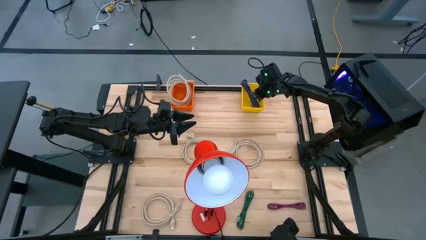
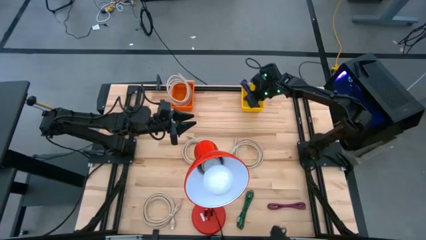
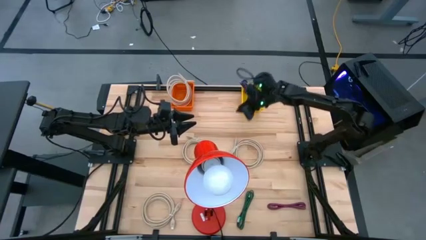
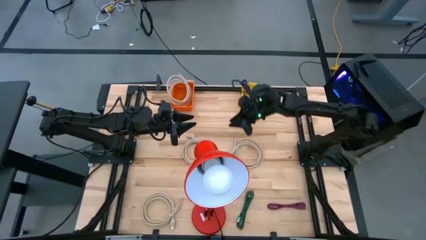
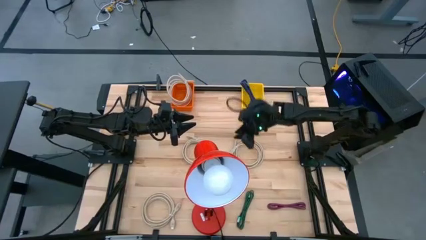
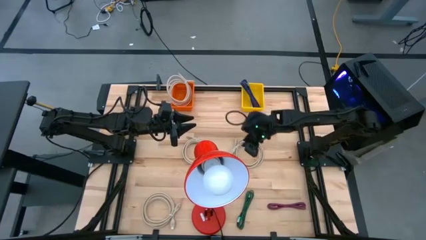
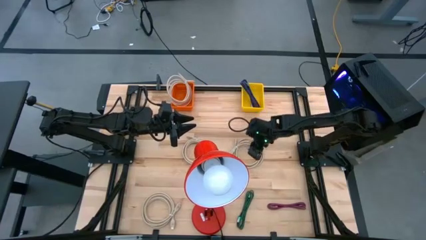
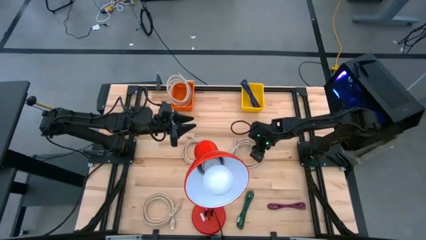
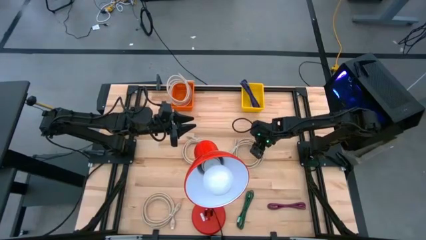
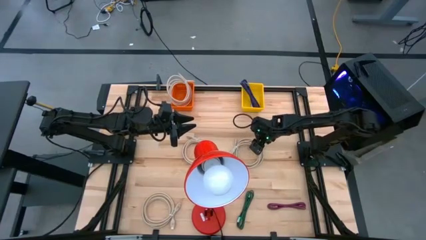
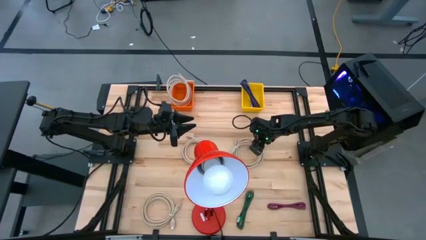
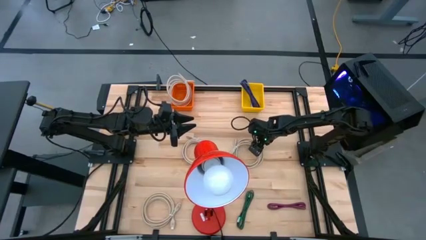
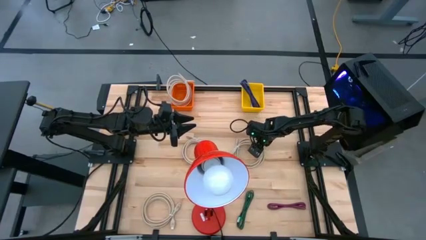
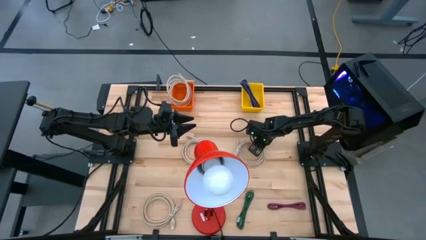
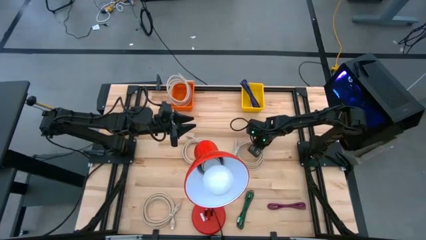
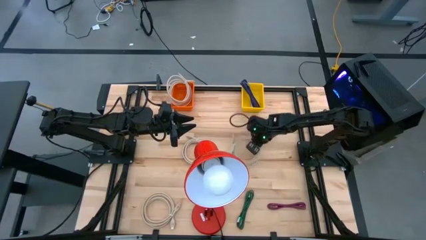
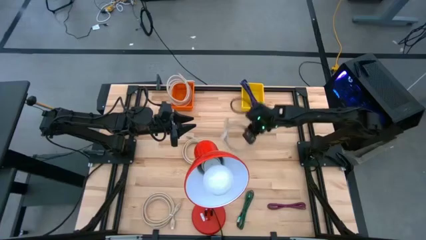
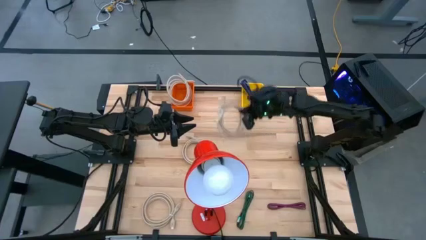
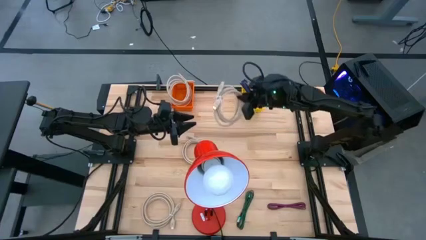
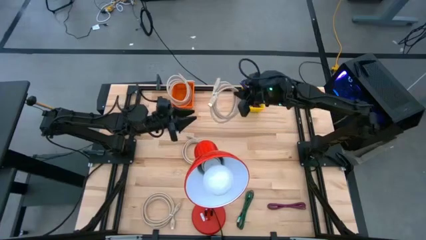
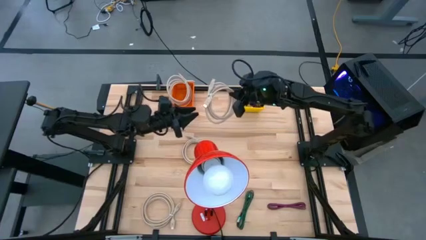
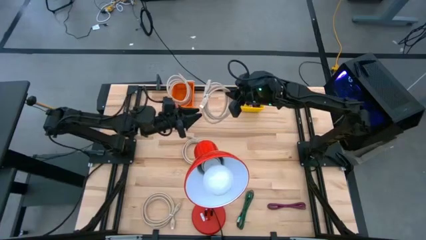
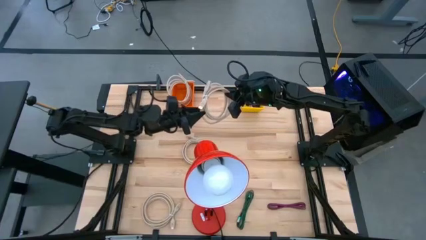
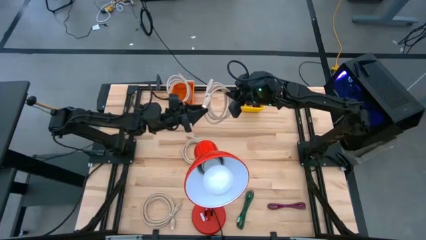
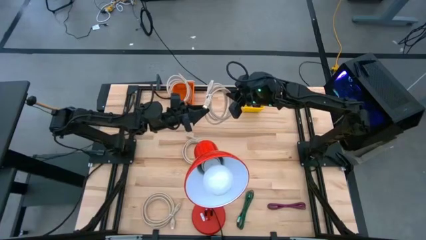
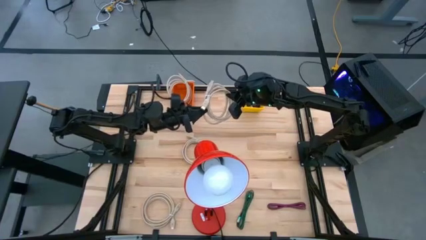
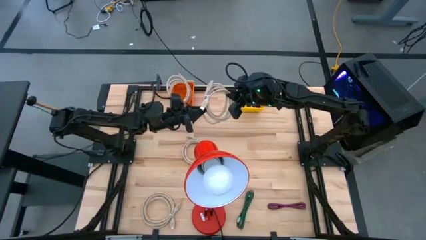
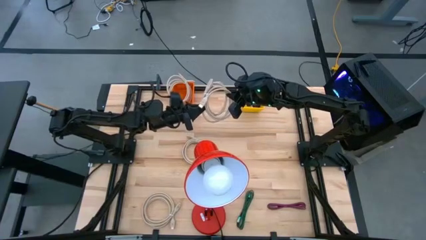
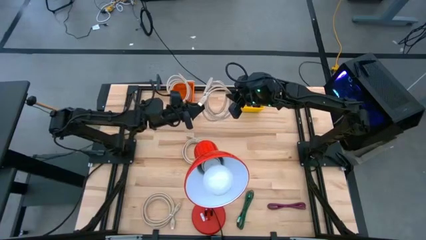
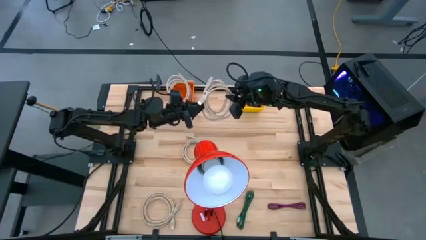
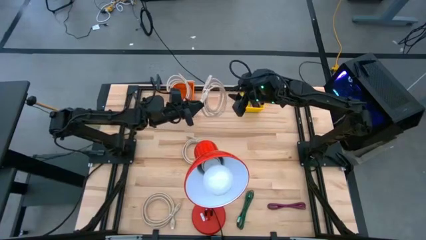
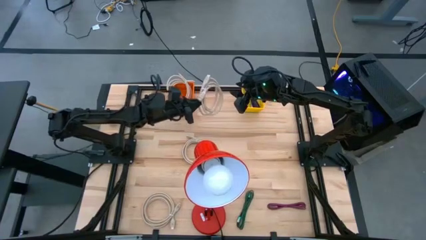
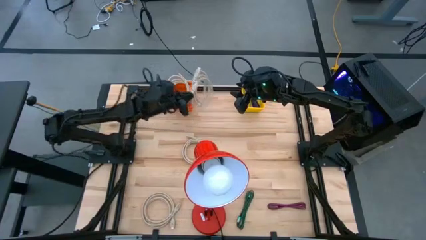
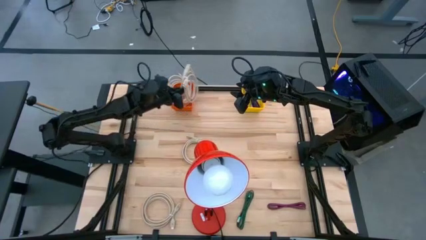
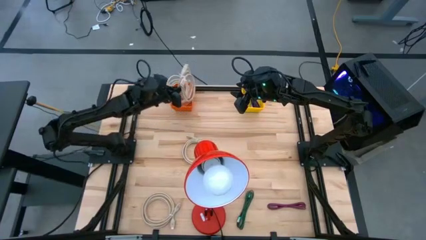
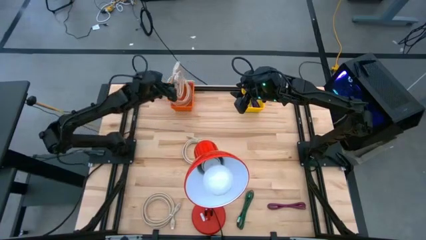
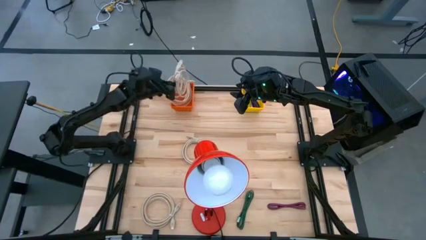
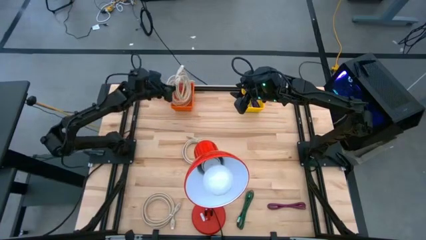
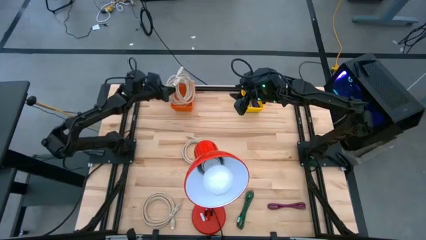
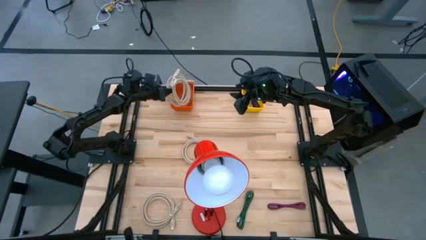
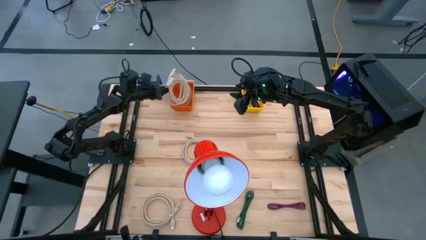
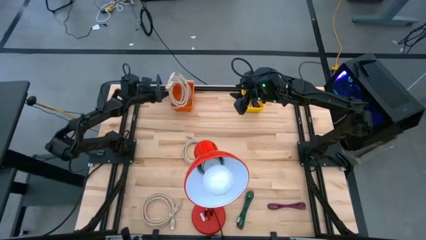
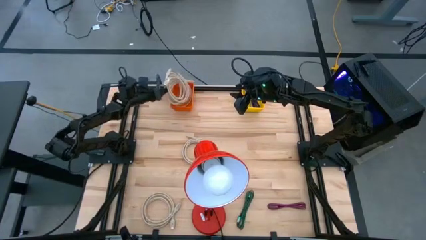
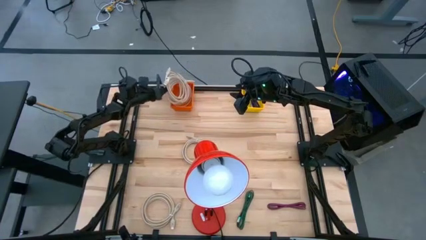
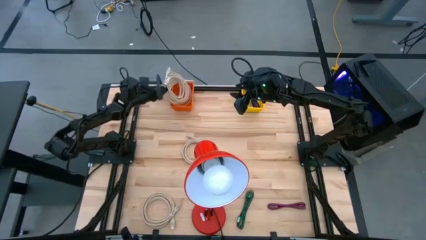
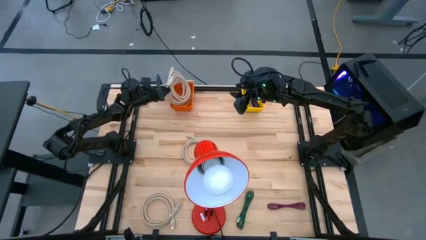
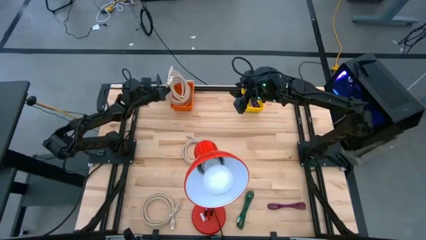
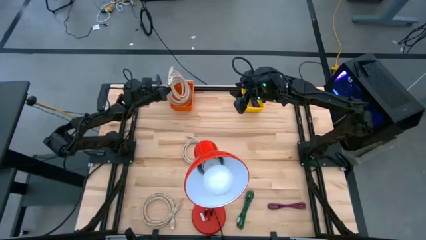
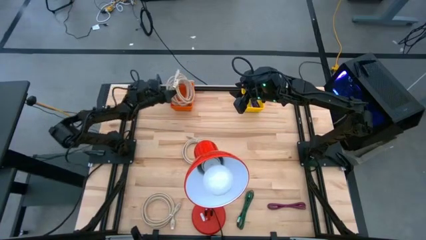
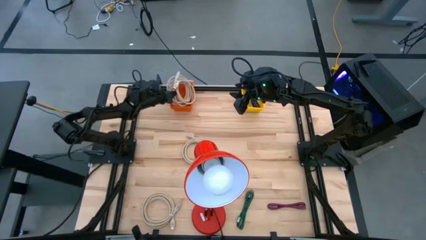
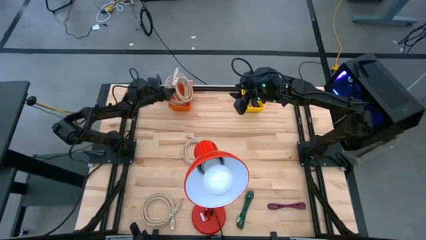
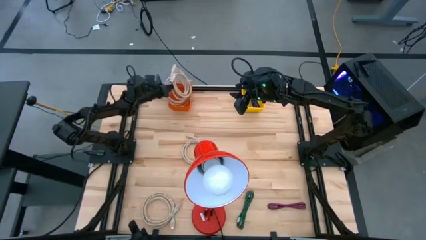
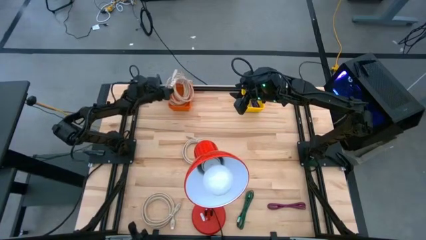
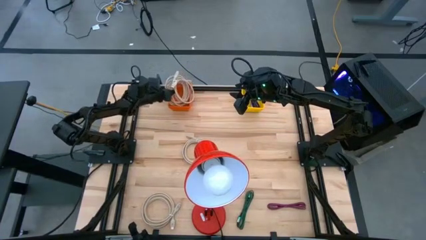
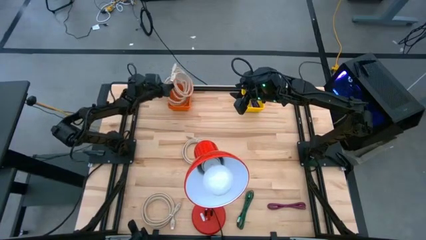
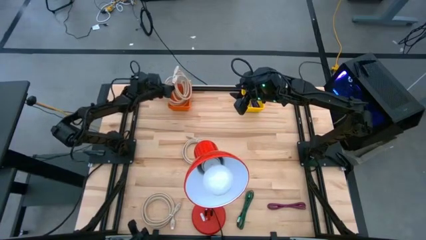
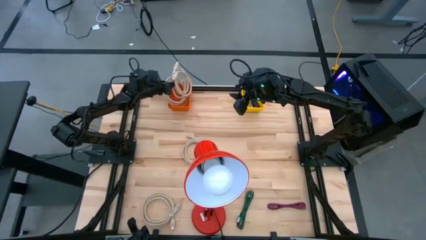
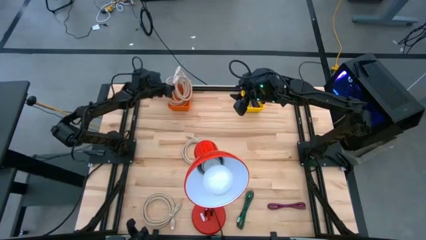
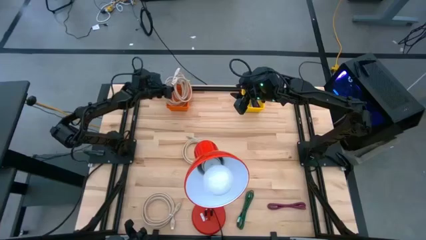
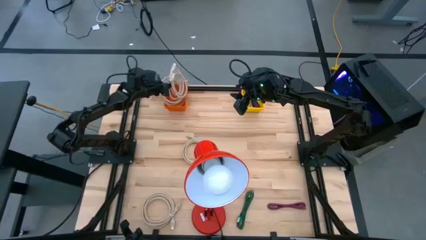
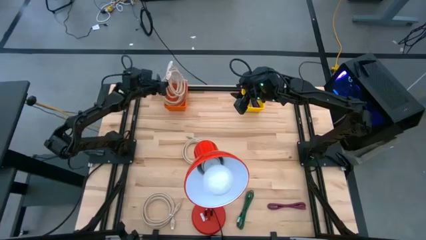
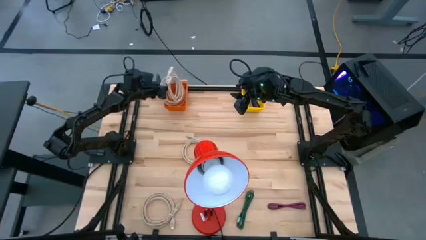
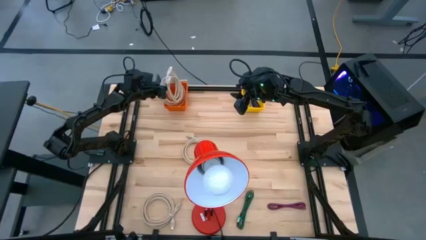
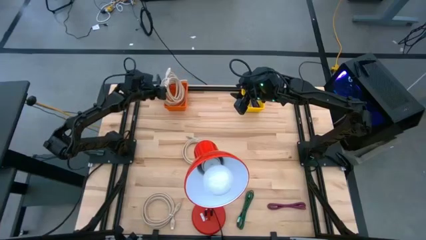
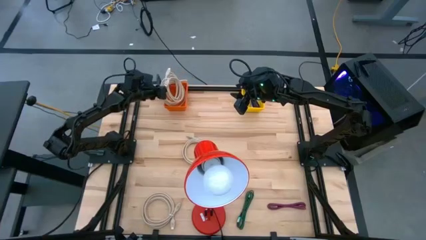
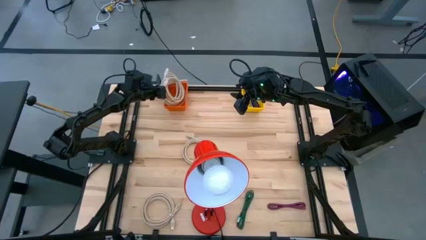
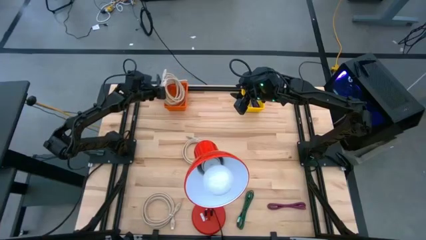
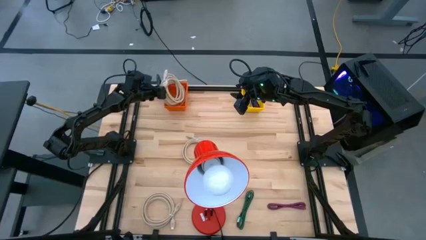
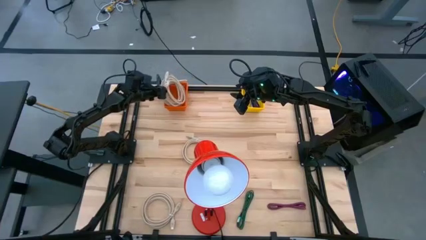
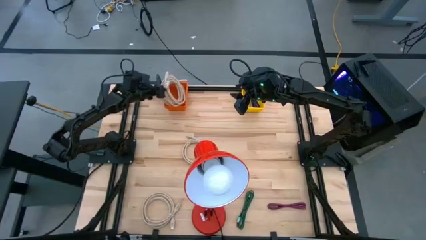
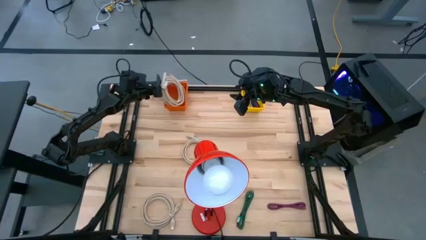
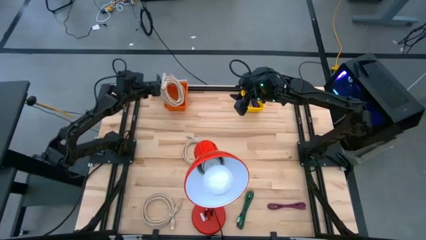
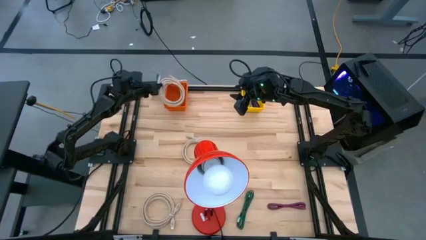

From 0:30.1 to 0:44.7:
Task: Pick & Place USB Port
Put the brown HDMI cable into the orange bin
